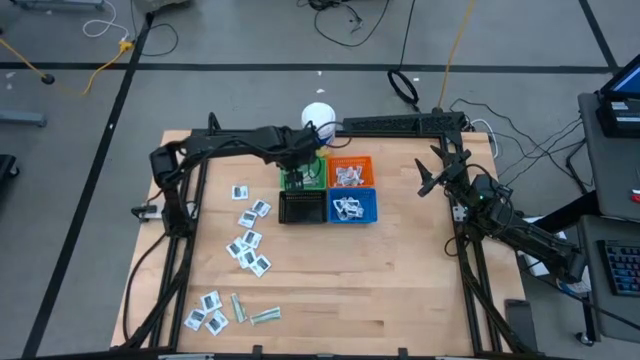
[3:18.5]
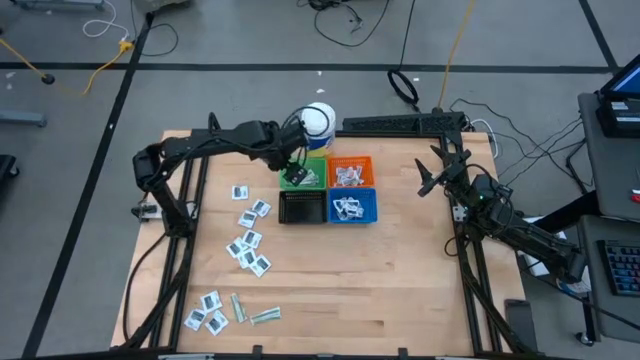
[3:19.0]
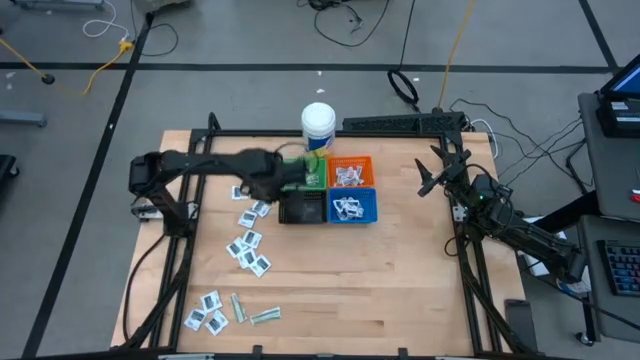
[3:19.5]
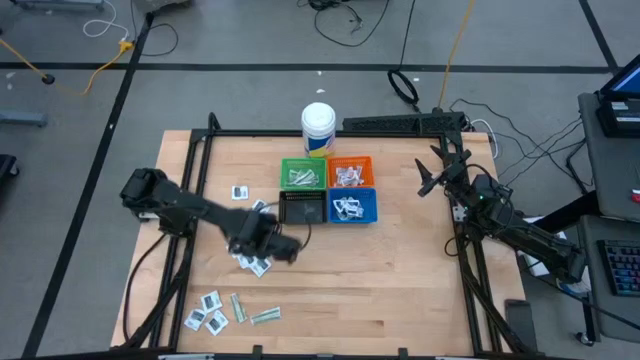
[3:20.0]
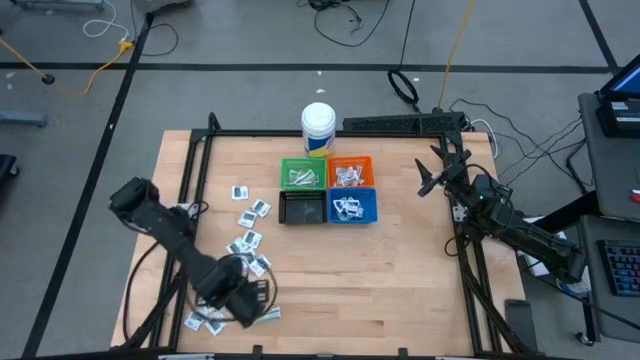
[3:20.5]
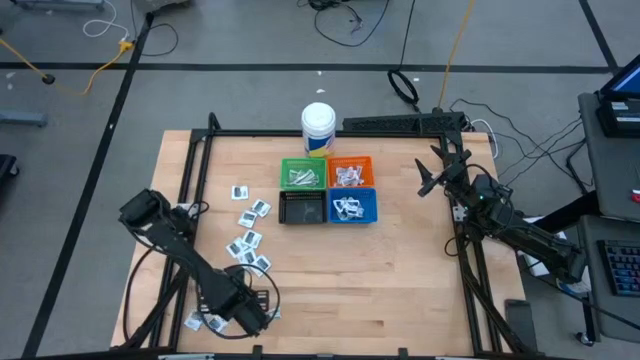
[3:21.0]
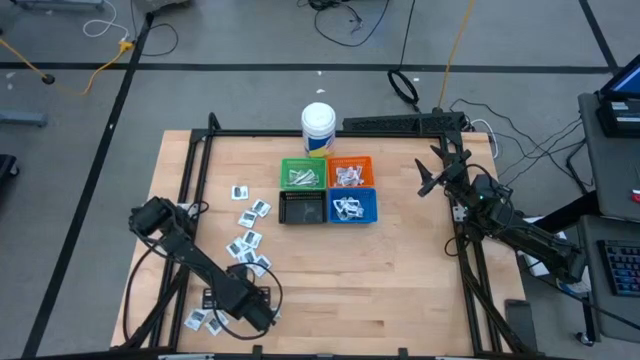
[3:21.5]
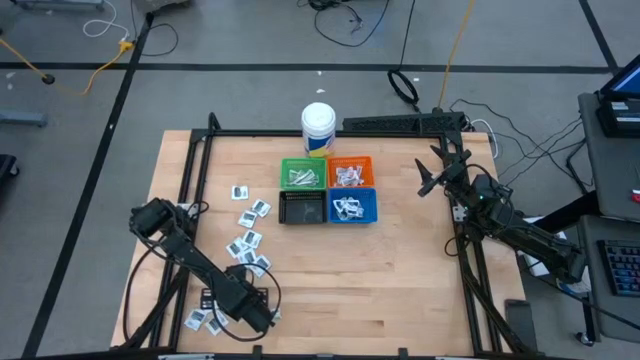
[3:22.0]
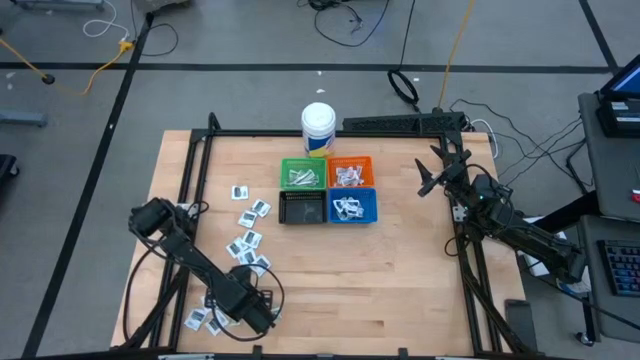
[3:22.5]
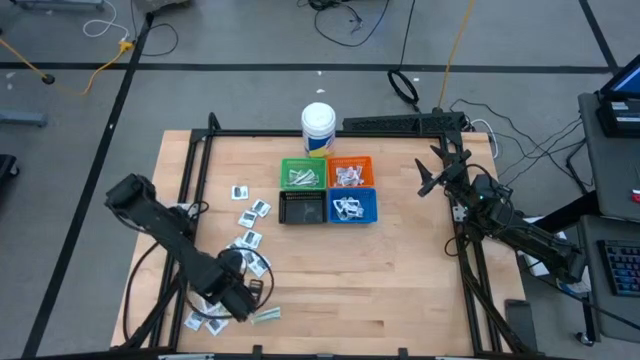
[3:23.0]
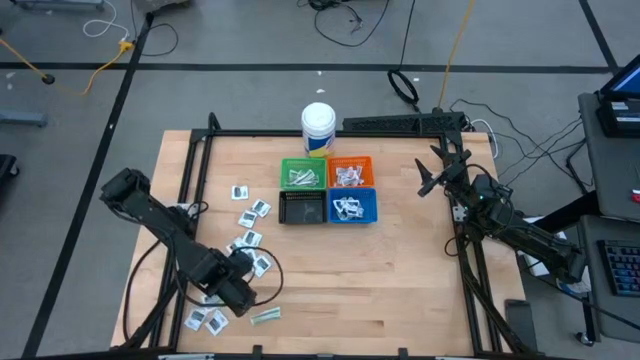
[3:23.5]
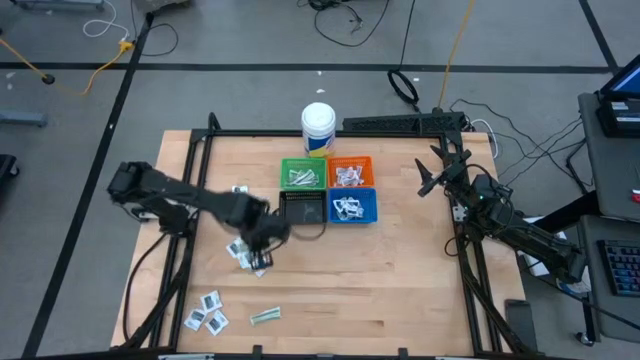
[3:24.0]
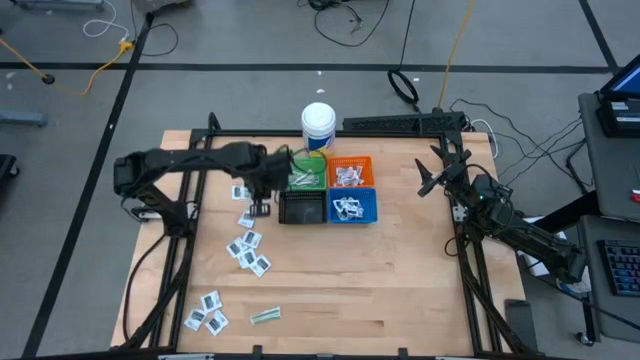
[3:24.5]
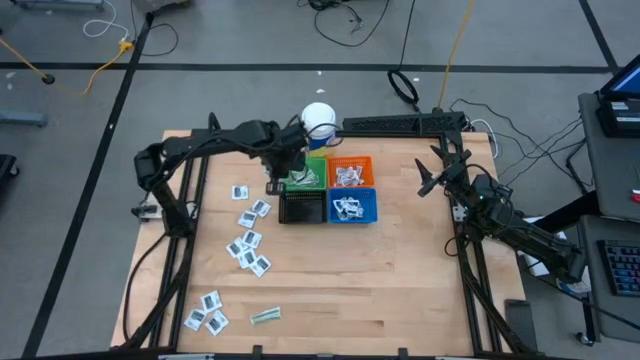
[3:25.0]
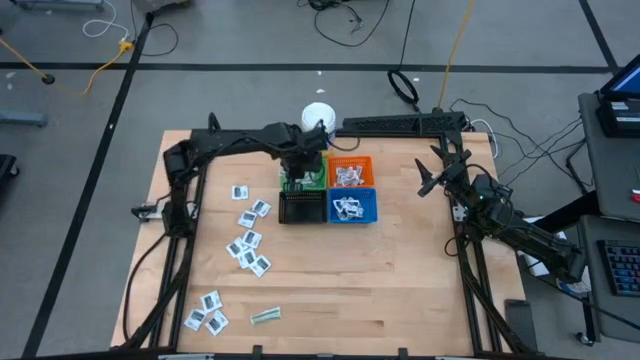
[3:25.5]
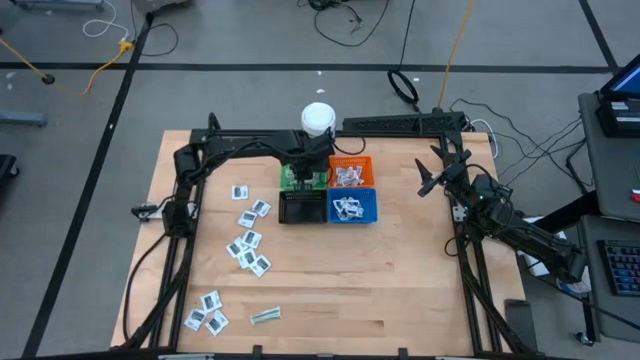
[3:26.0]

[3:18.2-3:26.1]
Task: Pick & Place First Aid Supplies
Put the green bandage pad into the green basket

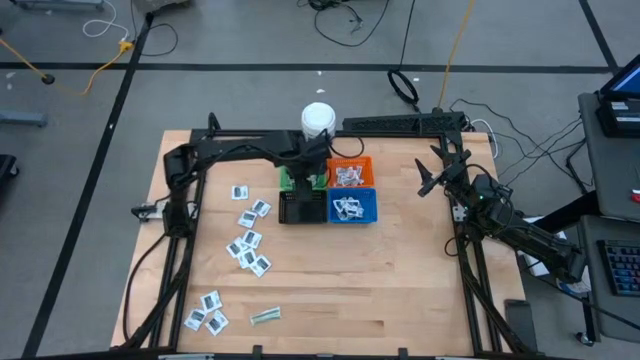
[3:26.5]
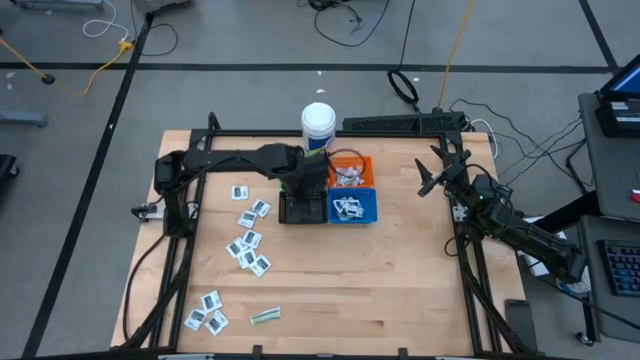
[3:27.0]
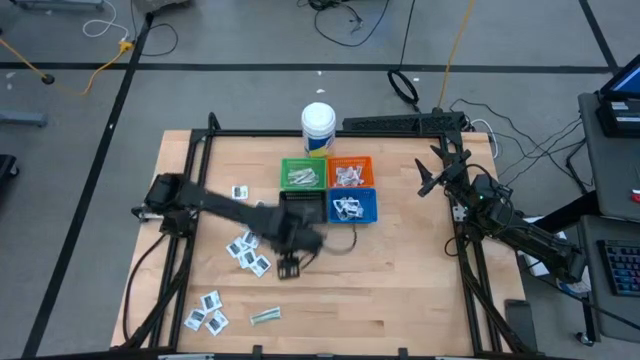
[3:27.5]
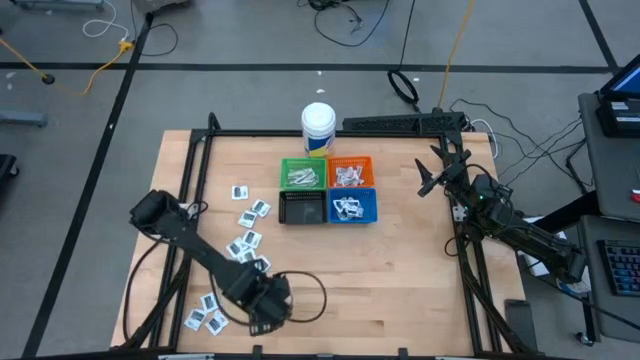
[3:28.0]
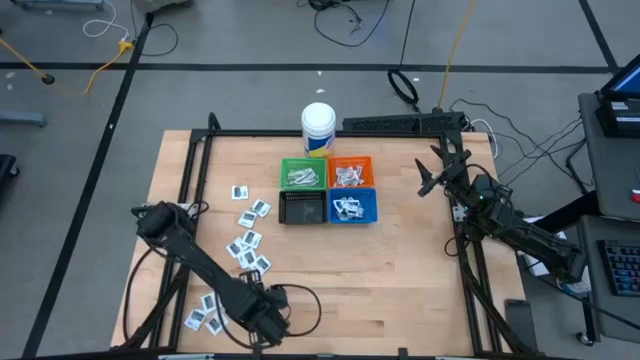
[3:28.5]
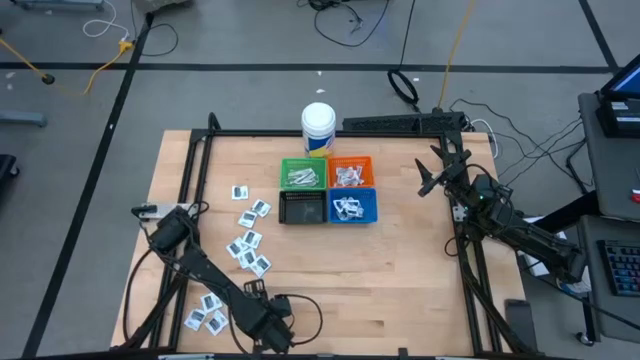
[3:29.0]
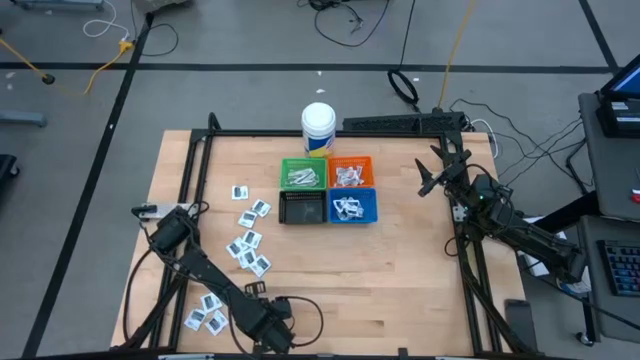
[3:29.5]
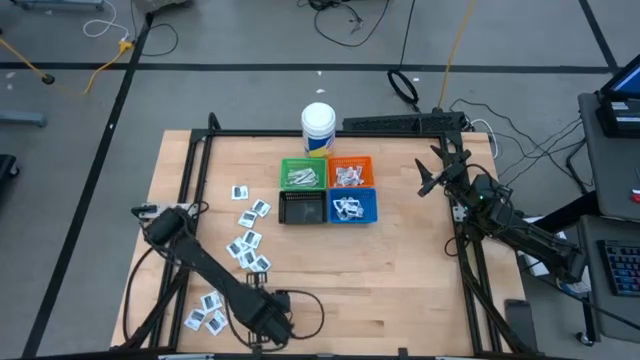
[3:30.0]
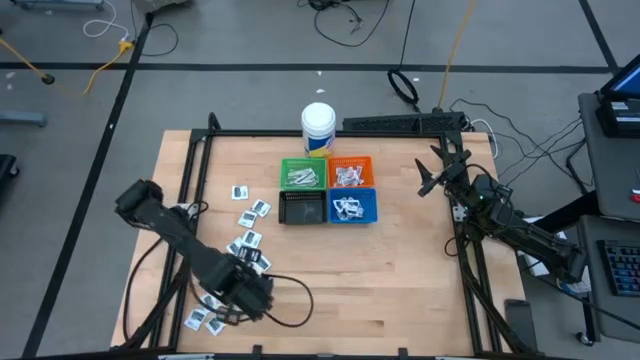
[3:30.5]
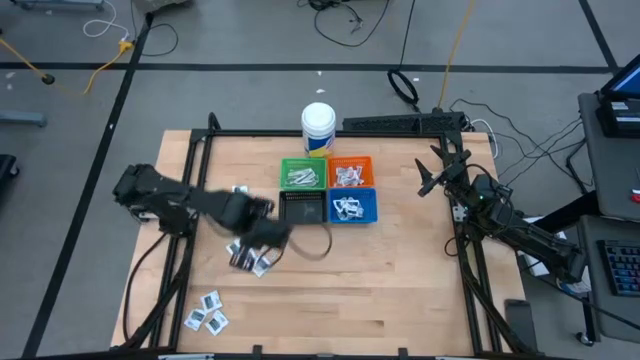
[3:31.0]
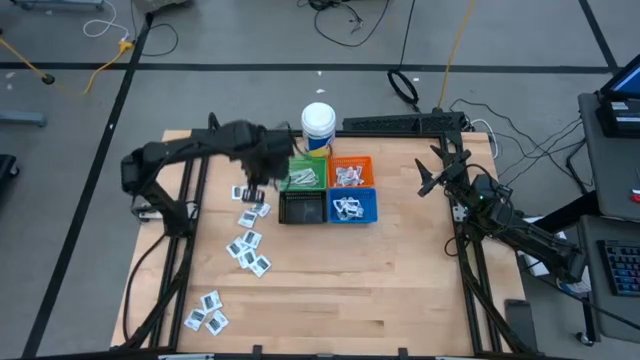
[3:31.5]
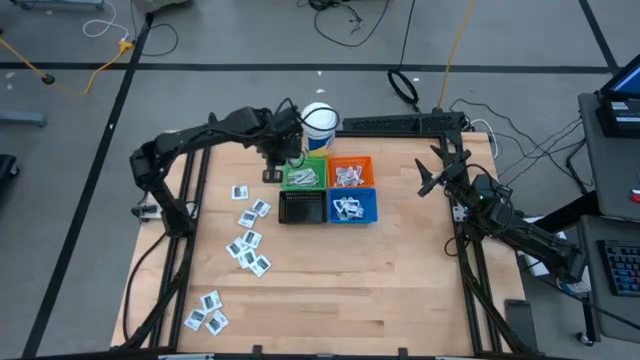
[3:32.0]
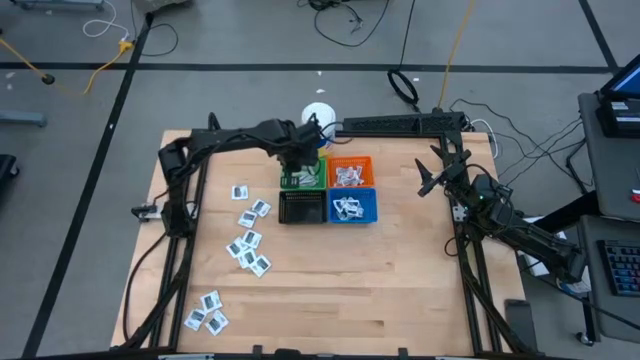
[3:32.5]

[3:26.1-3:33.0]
Put the green bandage pad into the green basket

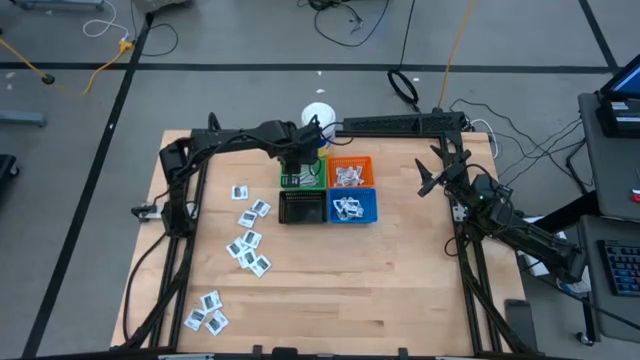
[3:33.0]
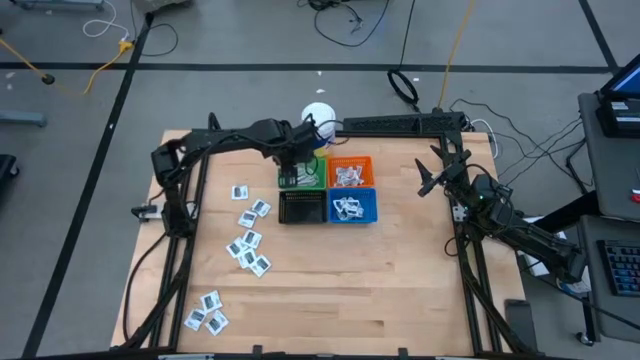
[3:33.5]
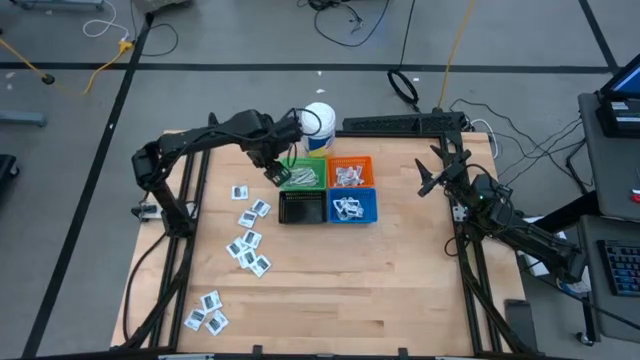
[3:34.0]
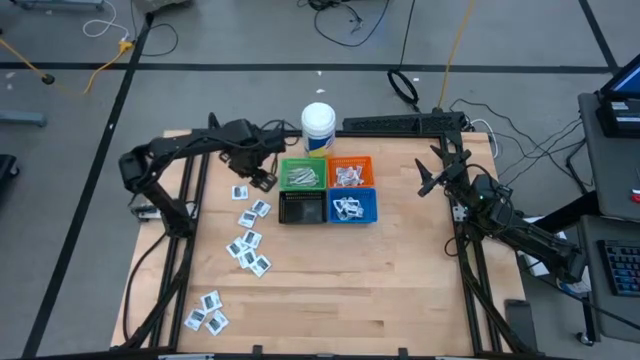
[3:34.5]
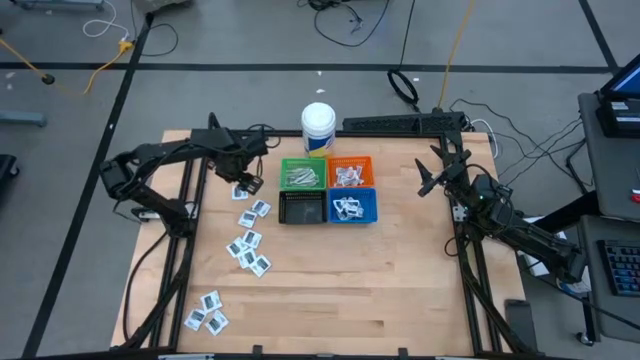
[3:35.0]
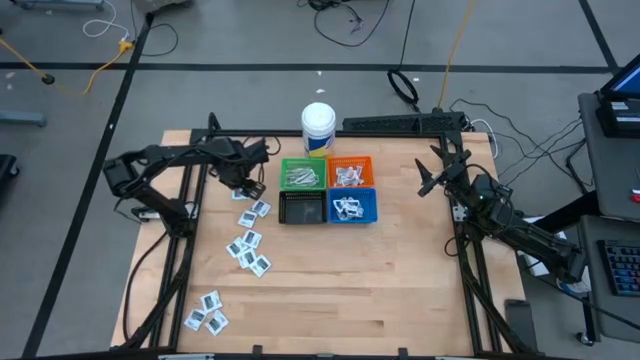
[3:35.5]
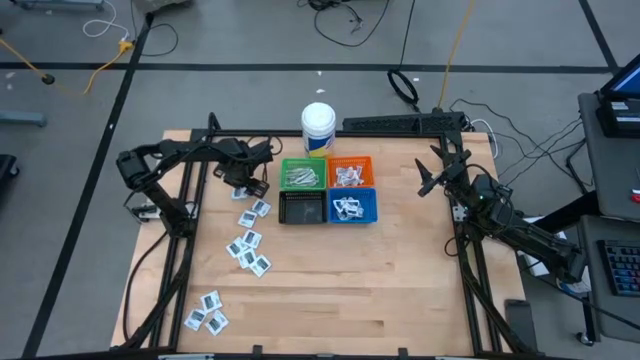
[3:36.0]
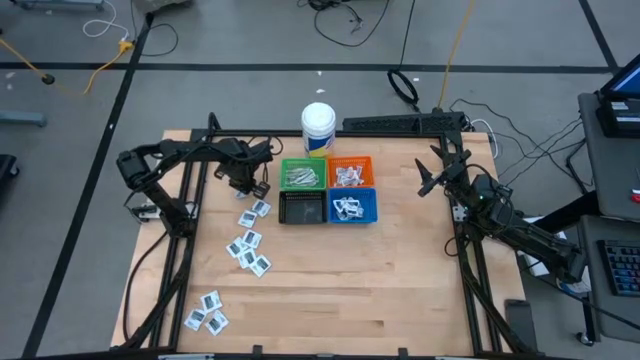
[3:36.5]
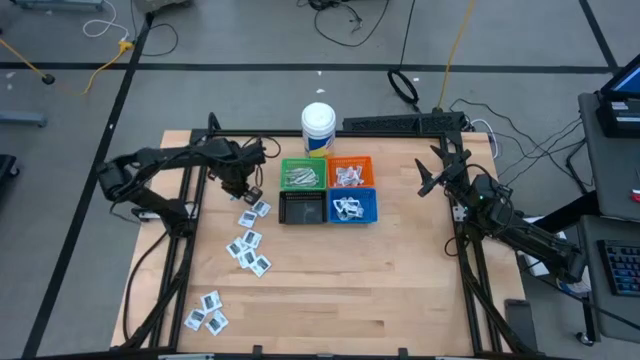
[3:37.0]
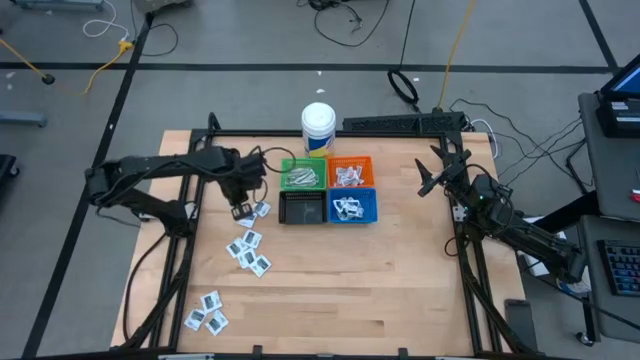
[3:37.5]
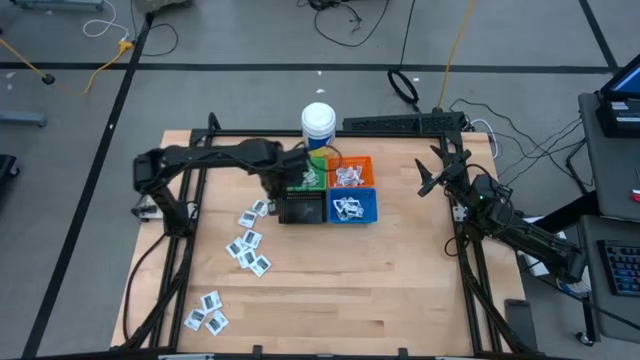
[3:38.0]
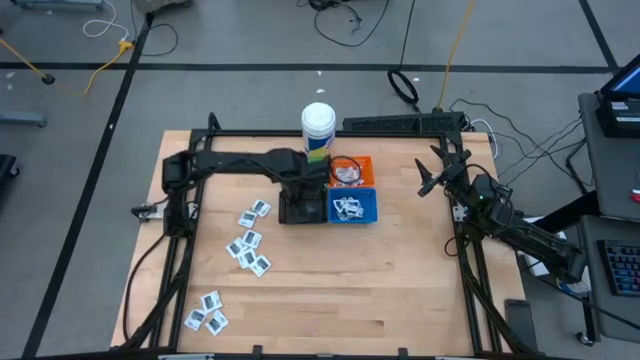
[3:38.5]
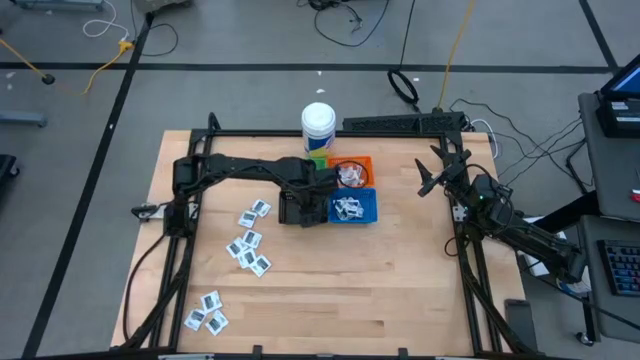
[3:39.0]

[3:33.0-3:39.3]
Put the black towelette pack into the black basket

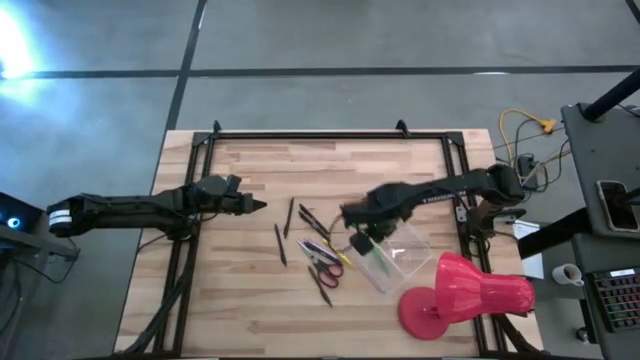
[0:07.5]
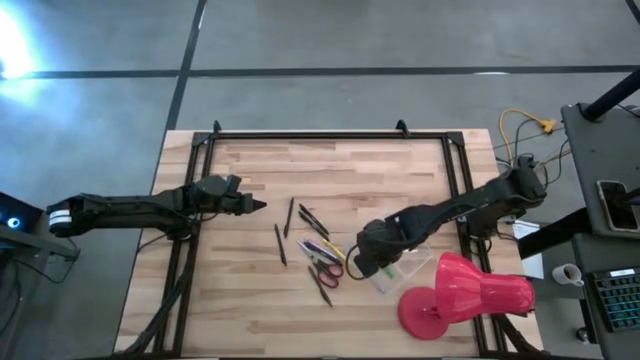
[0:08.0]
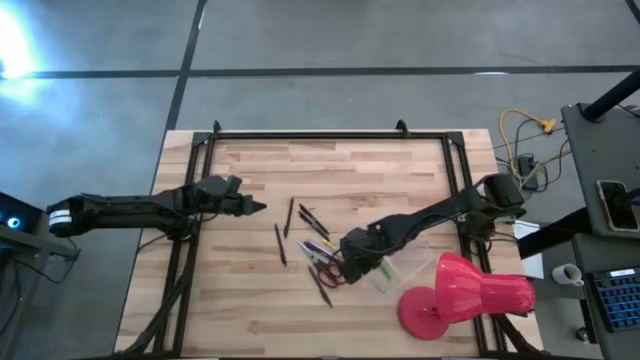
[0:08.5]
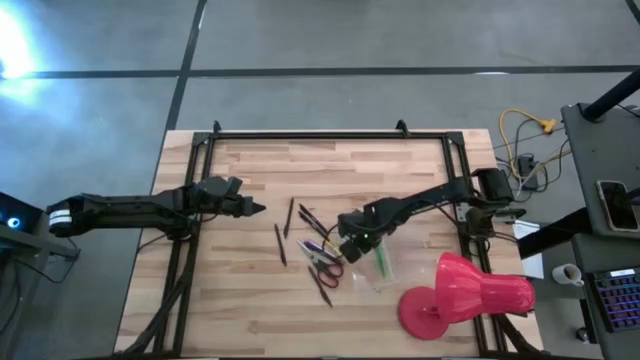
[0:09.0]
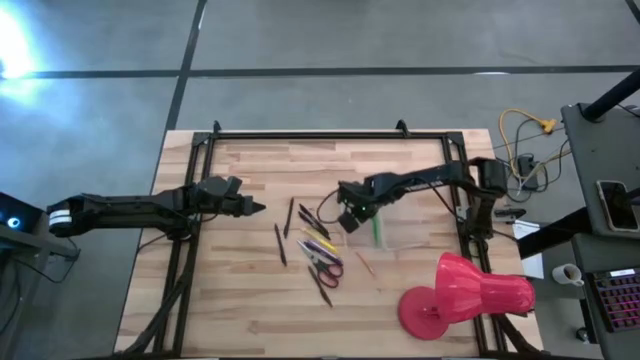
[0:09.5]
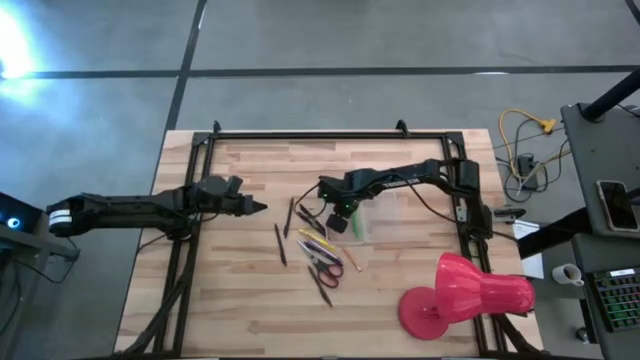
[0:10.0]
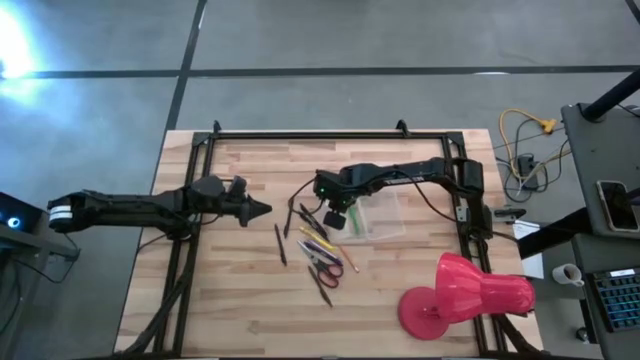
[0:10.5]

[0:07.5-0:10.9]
Task: Pick & place school supplies into a supply box
Adjust the transparent supply box
